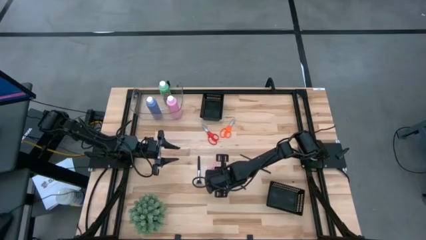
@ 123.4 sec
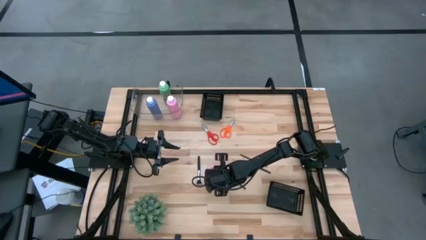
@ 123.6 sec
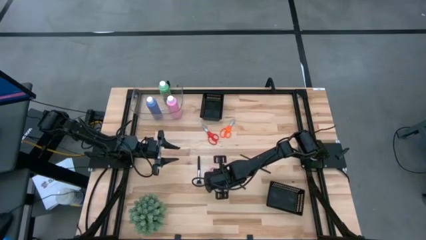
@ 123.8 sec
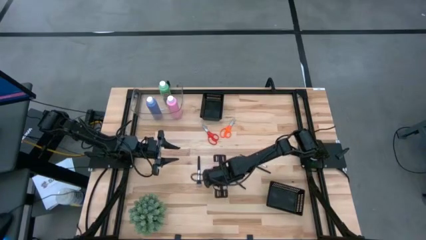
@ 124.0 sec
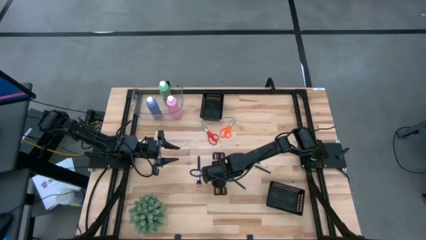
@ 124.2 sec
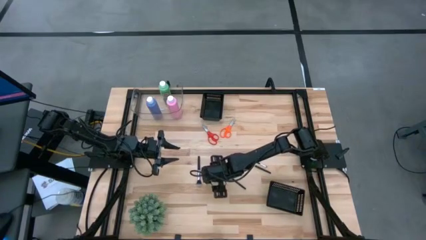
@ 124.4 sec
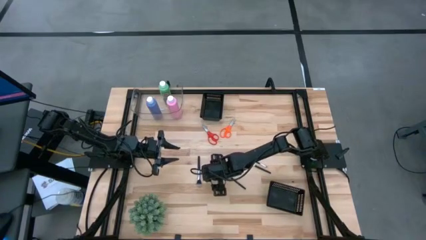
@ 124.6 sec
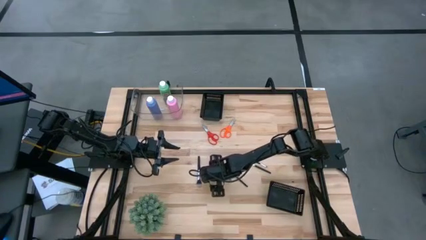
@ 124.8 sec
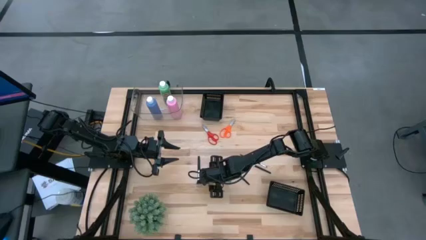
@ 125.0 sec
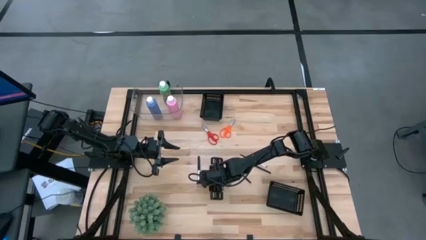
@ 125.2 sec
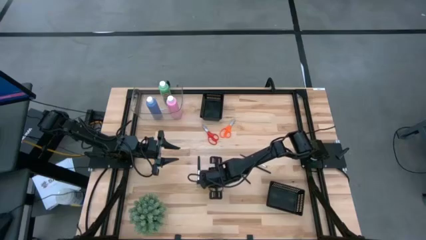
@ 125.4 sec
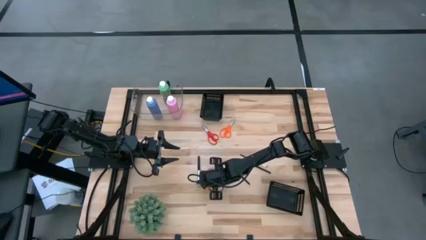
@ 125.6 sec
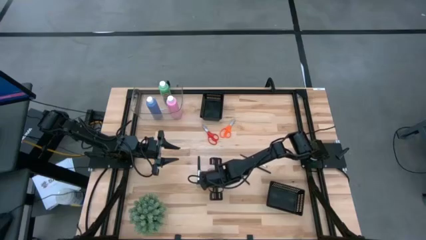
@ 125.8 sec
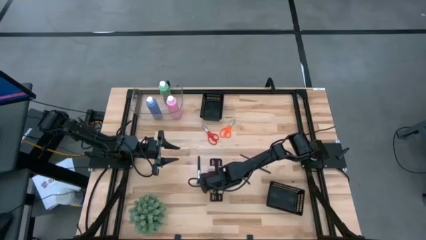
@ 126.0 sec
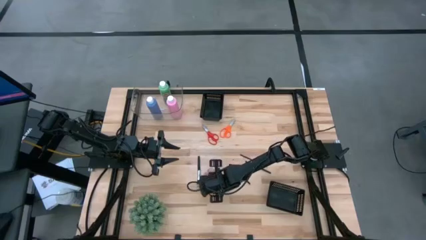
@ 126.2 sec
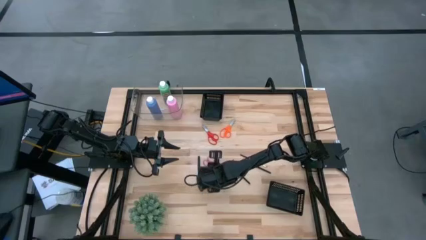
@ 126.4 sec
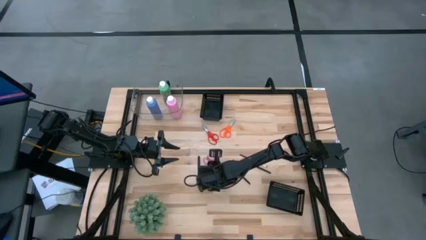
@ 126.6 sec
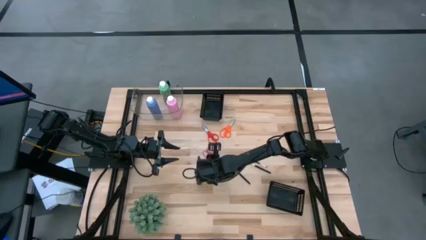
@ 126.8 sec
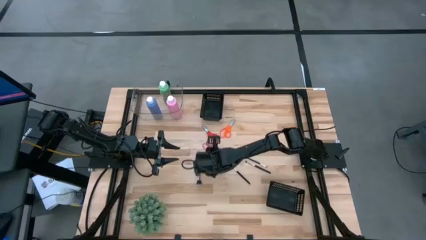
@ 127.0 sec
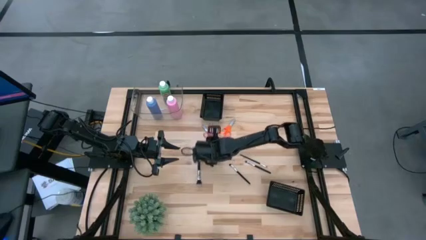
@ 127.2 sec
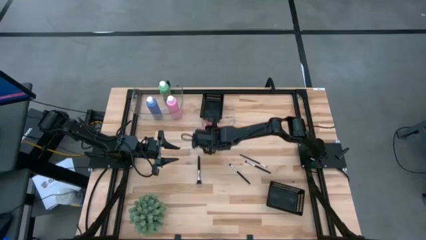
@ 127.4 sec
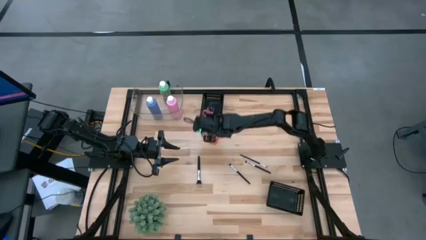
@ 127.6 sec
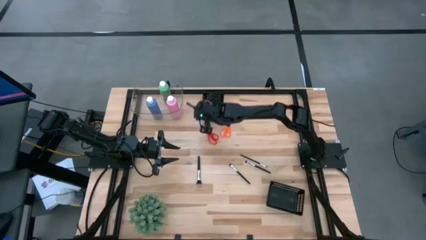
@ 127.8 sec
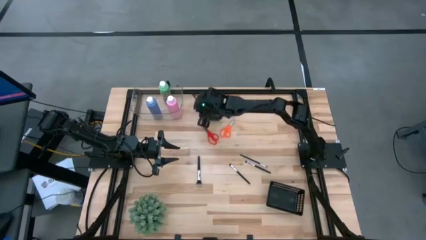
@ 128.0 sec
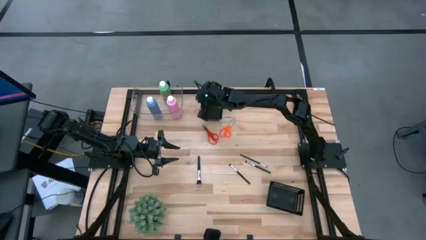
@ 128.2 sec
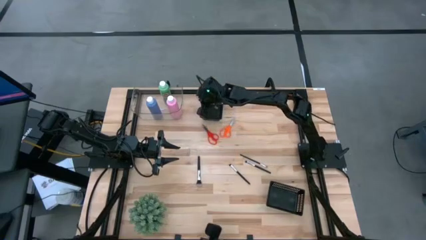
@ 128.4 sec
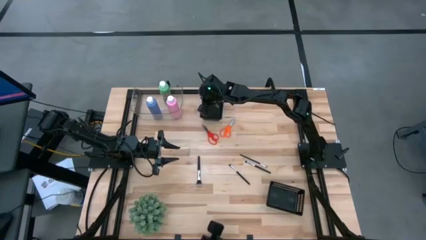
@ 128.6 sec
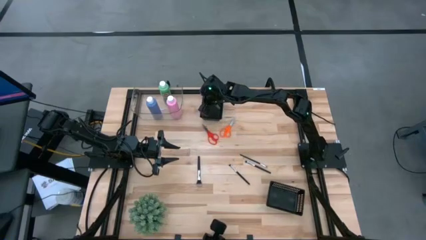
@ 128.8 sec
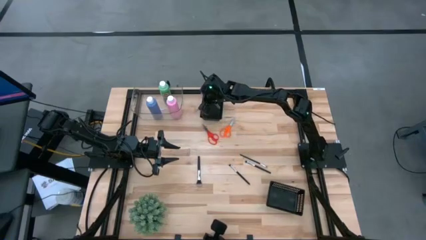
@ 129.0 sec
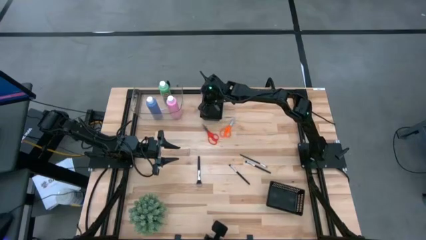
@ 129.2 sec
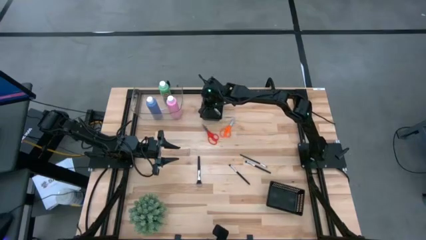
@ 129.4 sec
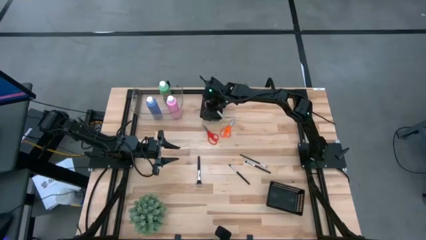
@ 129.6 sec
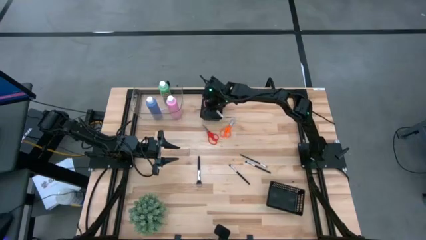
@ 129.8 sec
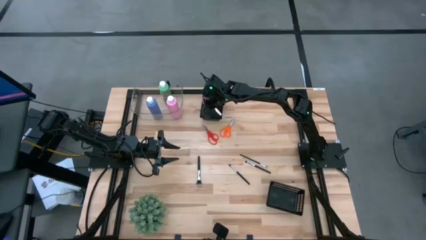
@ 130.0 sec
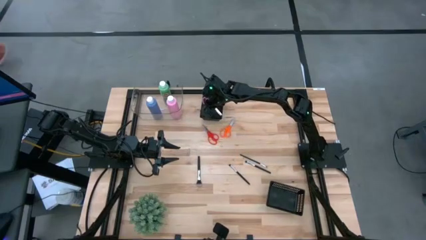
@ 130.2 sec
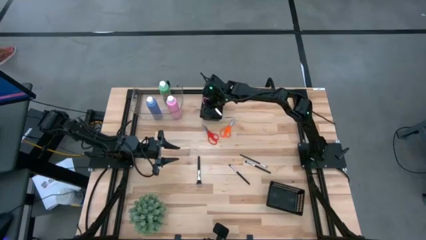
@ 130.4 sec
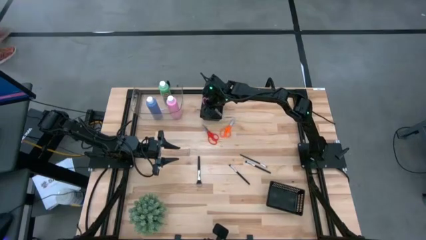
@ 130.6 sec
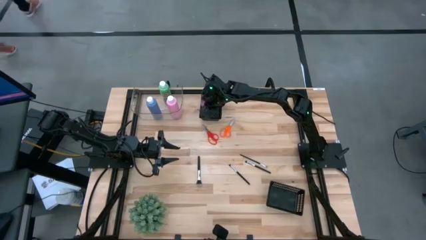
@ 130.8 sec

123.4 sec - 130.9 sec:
Task: Pick & Place Paint Supplies
Put the pink scissors into the top black bin

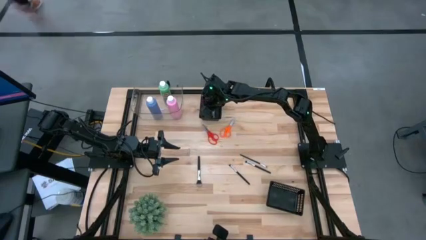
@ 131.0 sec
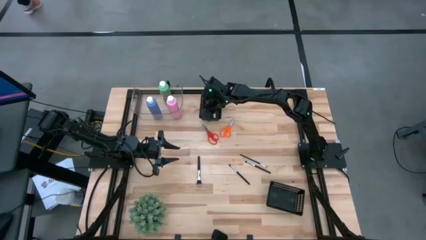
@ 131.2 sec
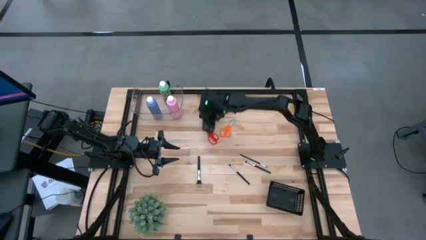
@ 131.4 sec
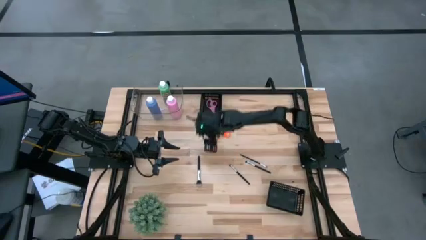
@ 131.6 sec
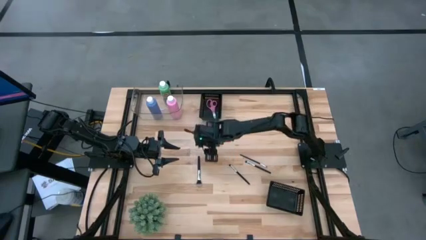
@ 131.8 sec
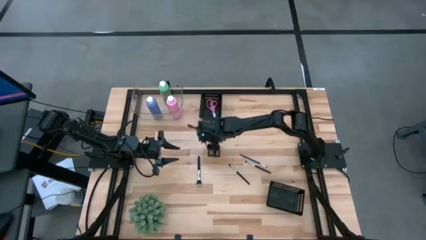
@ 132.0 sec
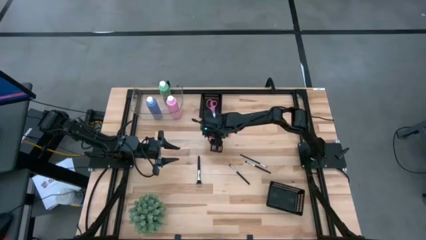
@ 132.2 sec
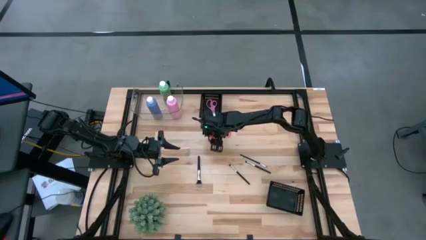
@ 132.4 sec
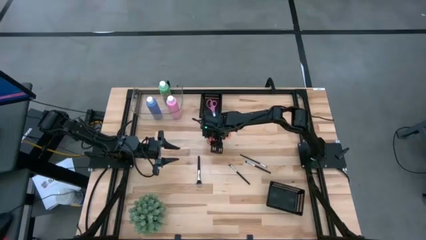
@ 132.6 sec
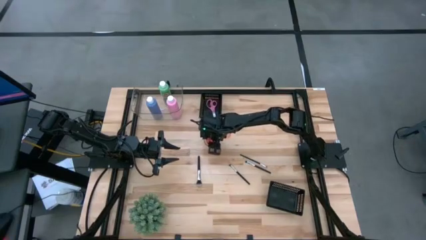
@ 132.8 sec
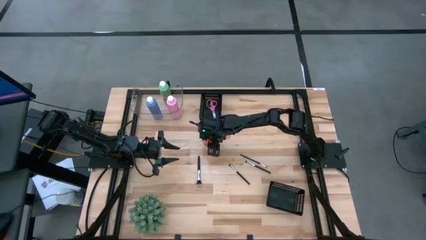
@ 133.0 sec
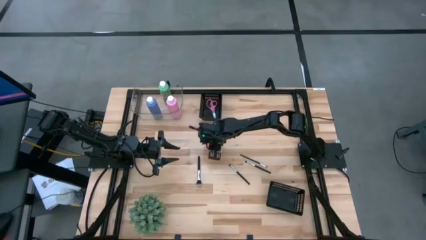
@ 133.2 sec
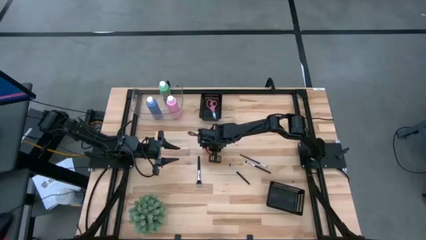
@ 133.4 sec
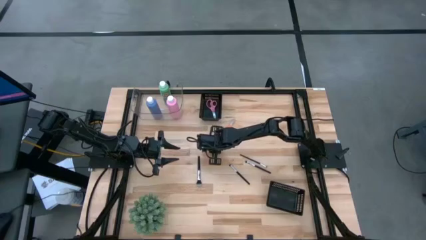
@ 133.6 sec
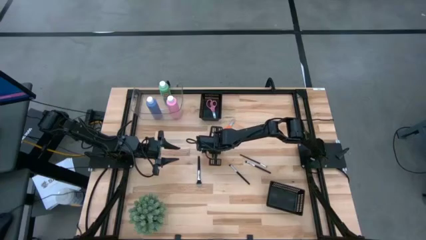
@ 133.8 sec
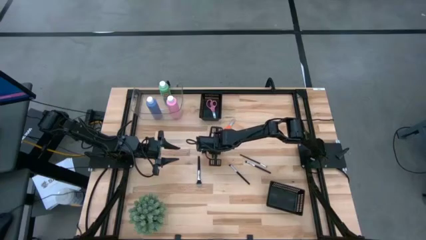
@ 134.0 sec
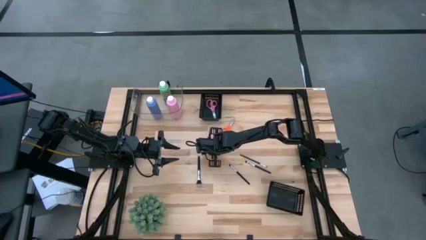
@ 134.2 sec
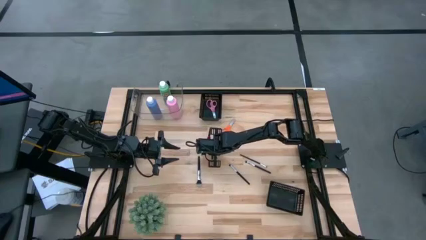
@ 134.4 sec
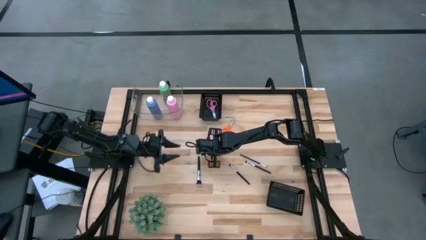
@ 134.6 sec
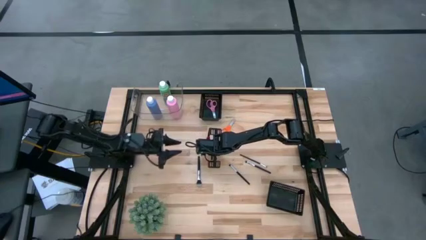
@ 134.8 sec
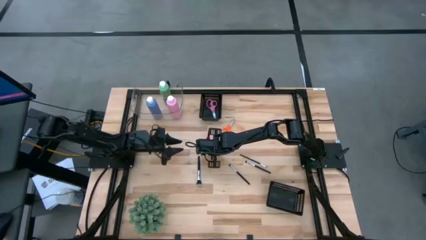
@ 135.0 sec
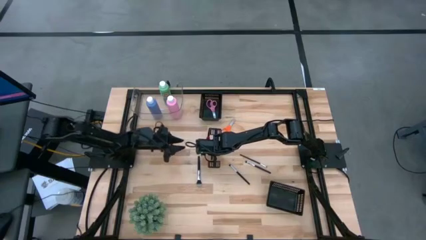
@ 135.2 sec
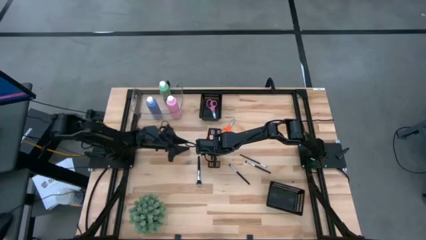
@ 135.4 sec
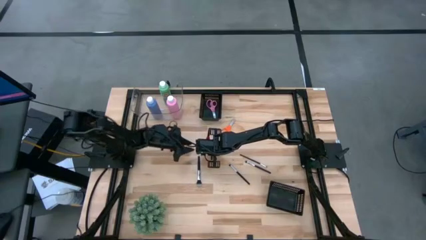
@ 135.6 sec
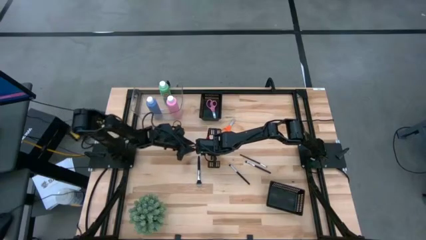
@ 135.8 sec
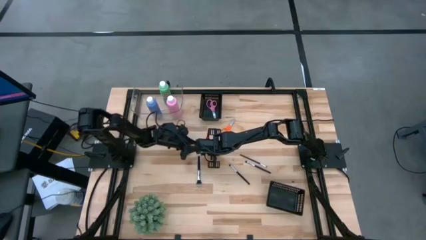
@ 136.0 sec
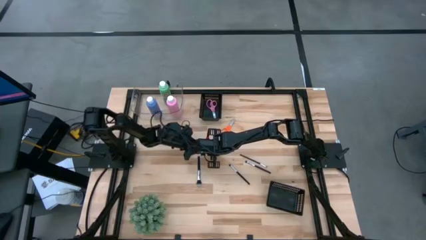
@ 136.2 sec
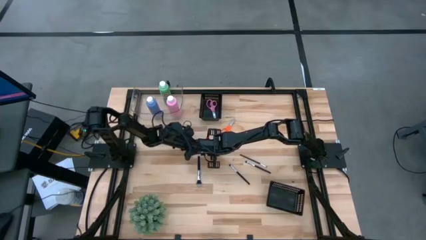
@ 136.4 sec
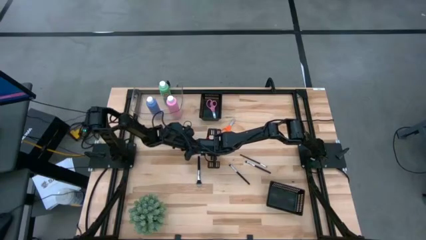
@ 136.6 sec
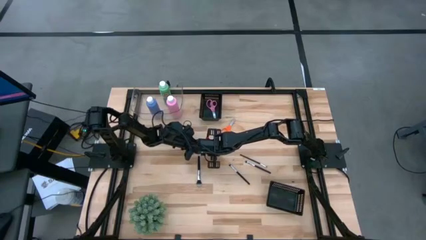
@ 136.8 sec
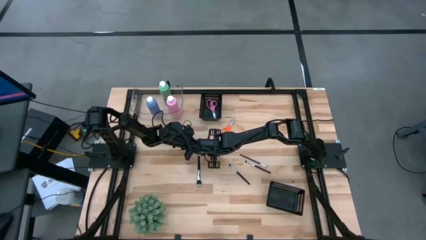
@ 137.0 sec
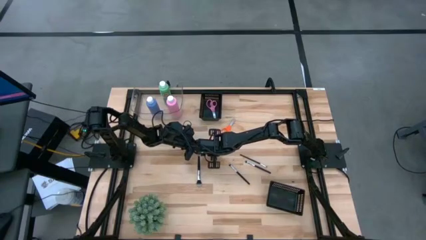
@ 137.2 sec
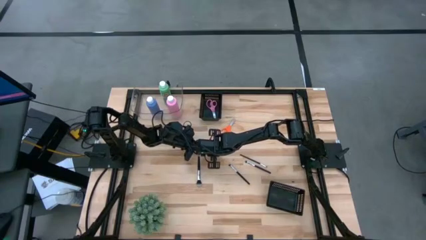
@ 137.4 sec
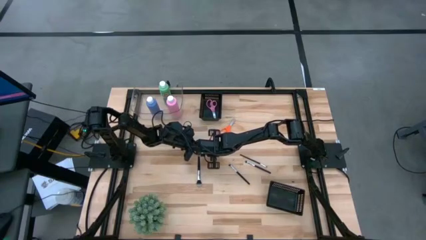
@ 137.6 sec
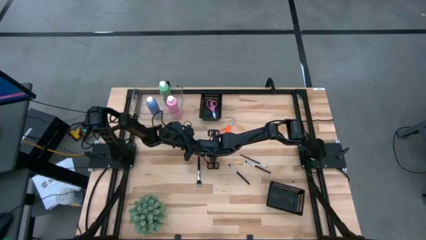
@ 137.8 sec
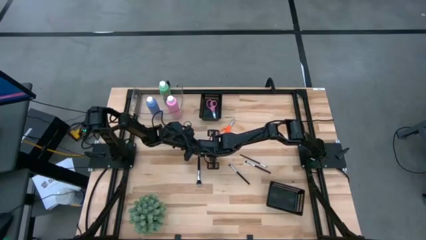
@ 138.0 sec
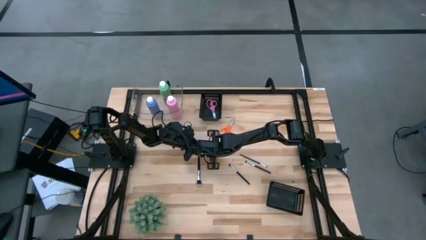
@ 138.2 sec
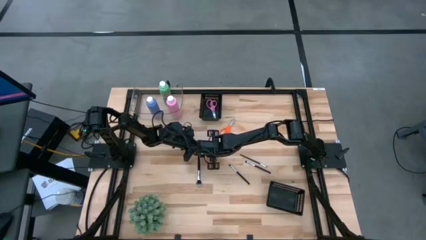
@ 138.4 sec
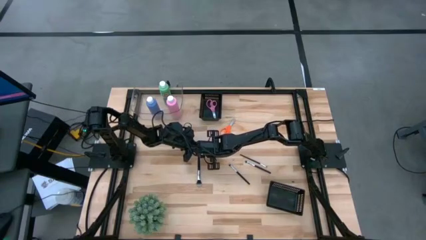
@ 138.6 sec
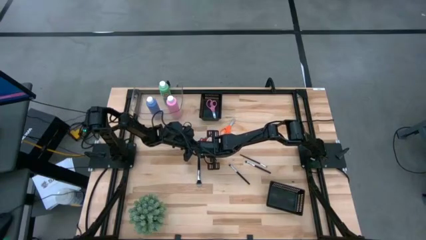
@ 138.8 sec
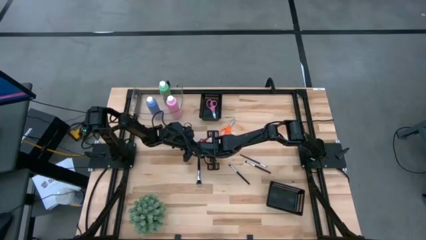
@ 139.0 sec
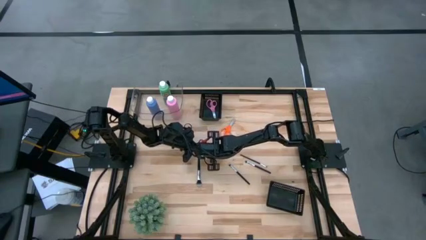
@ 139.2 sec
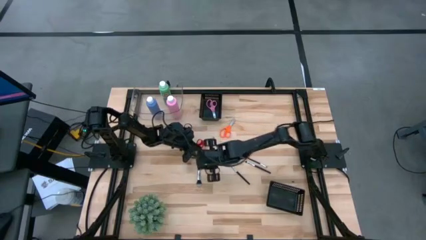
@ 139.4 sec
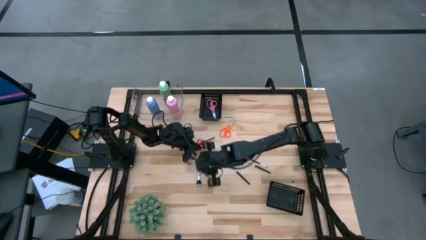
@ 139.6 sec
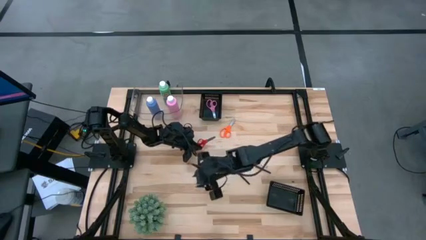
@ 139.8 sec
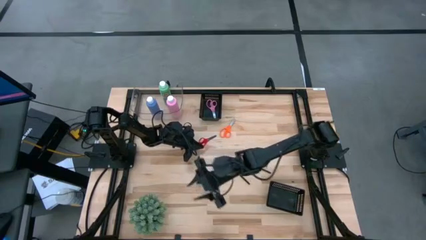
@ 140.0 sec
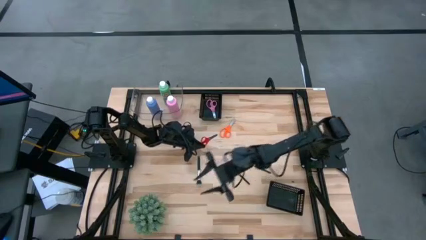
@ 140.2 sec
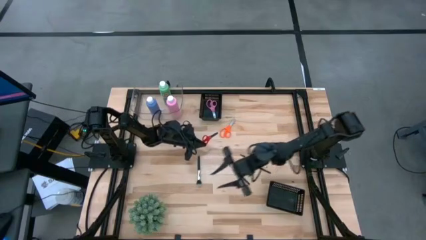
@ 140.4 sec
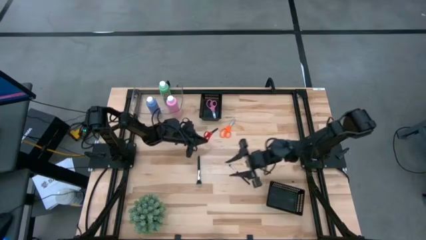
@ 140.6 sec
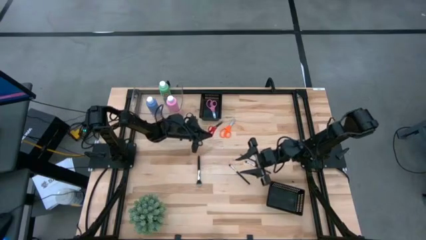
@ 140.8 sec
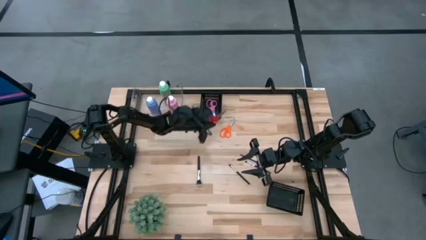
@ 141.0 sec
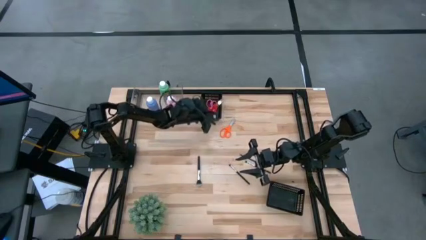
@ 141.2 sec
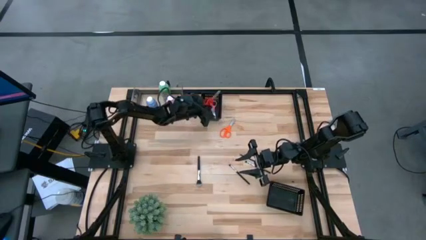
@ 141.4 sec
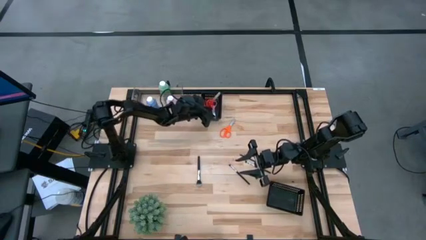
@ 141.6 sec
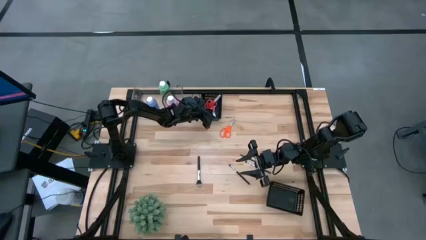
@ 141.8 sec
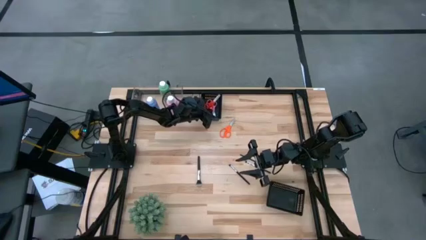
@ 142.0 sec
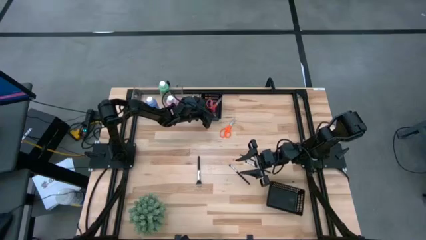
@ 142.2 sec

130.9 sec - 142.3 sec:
Put the red scissors into the top black bin
